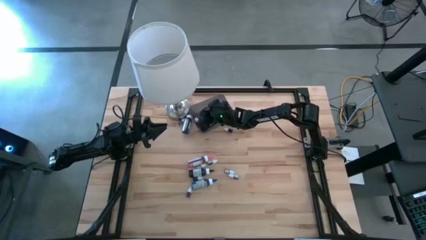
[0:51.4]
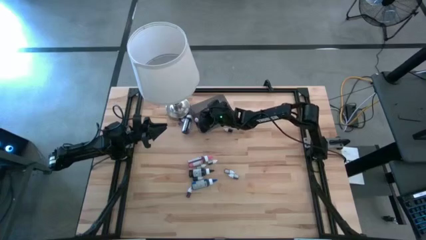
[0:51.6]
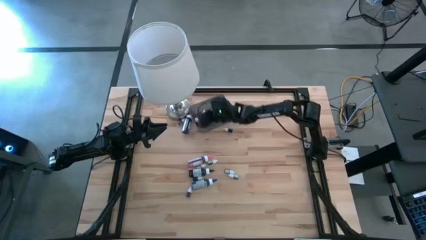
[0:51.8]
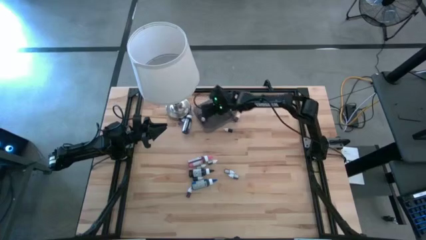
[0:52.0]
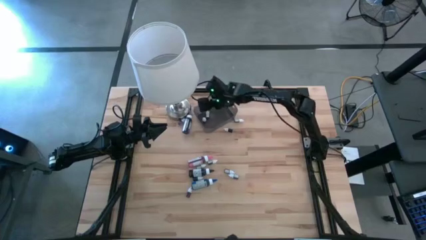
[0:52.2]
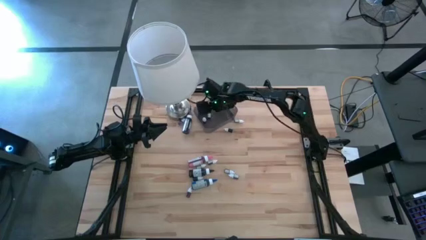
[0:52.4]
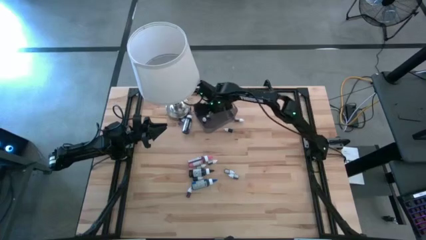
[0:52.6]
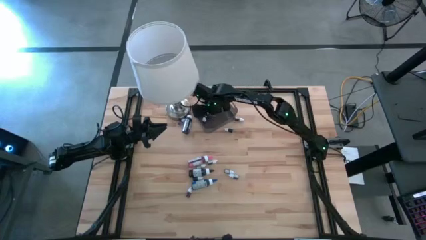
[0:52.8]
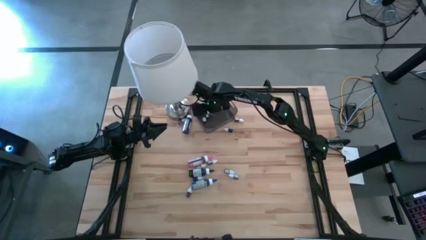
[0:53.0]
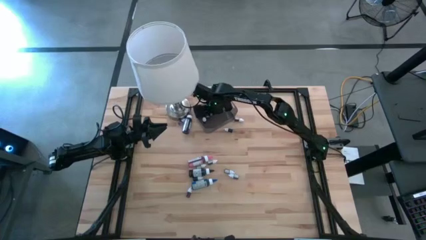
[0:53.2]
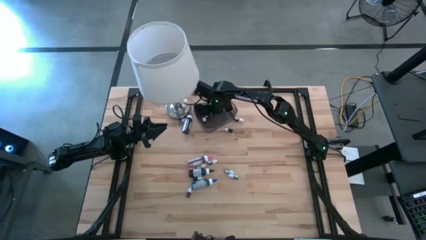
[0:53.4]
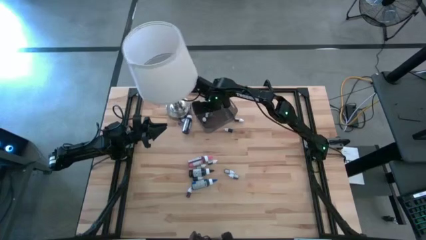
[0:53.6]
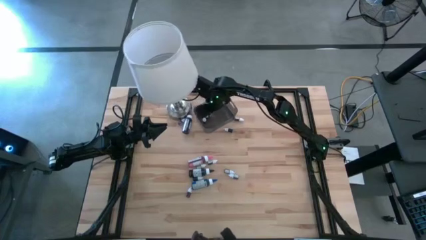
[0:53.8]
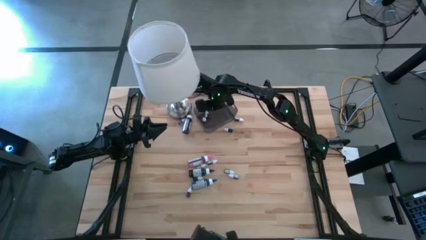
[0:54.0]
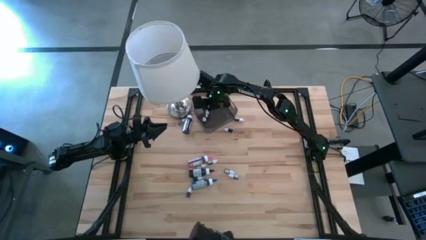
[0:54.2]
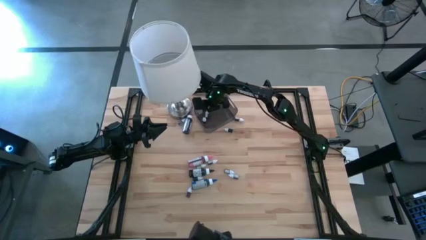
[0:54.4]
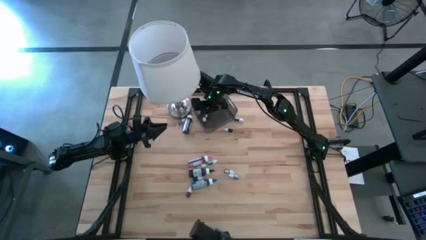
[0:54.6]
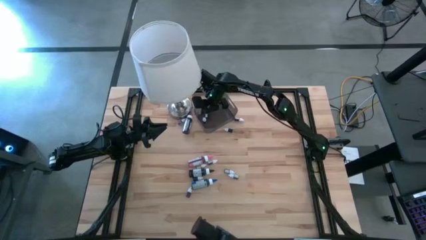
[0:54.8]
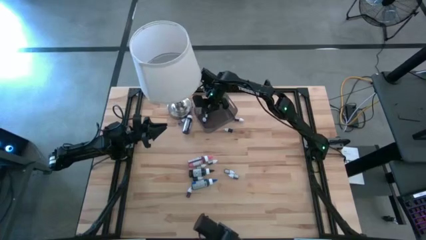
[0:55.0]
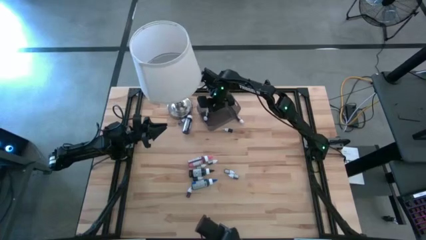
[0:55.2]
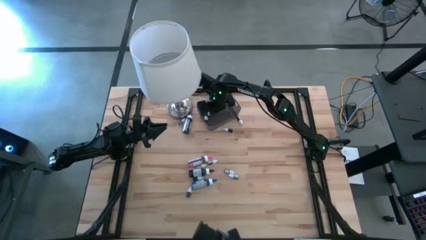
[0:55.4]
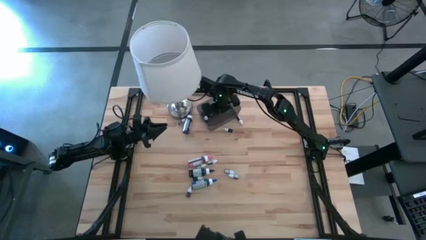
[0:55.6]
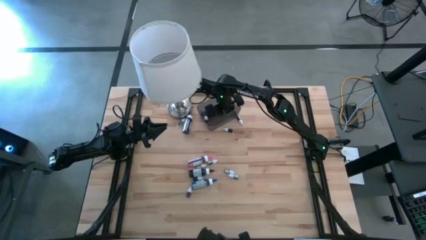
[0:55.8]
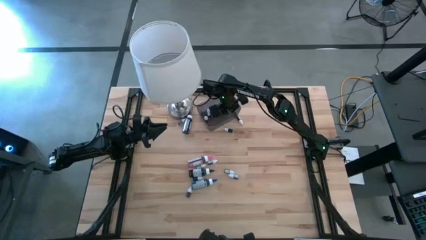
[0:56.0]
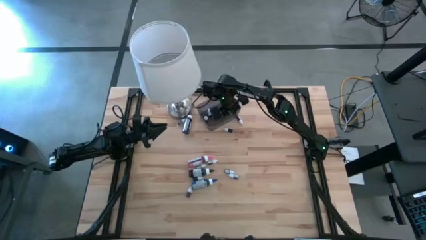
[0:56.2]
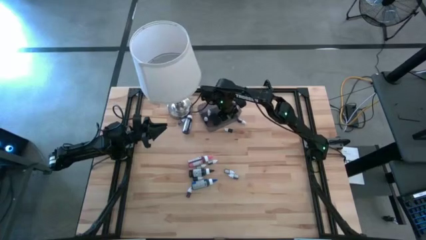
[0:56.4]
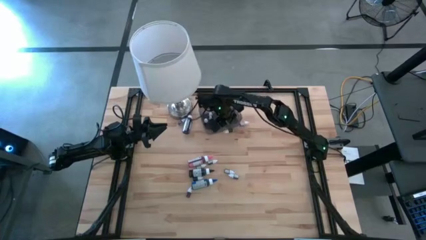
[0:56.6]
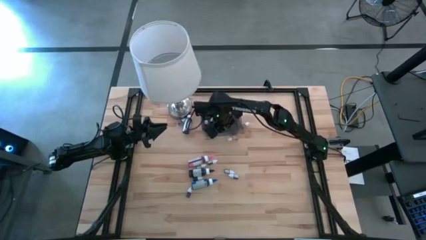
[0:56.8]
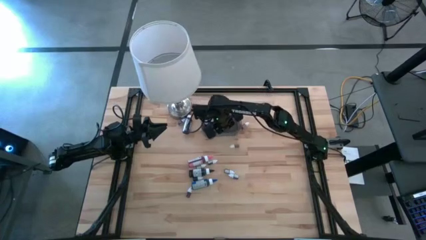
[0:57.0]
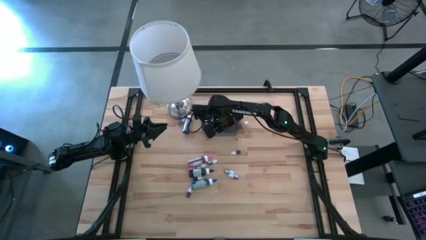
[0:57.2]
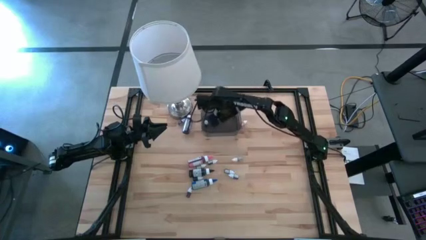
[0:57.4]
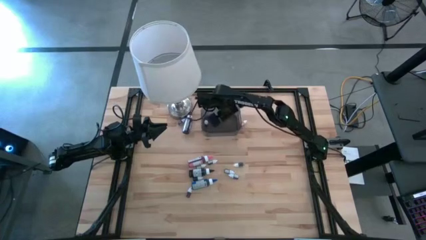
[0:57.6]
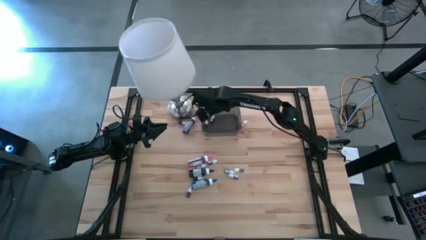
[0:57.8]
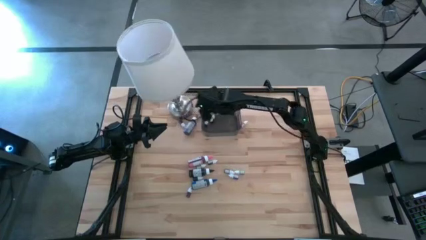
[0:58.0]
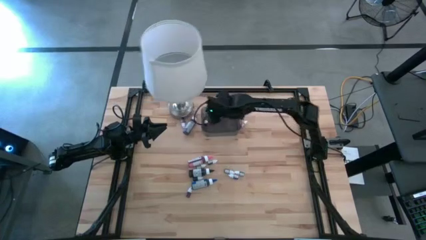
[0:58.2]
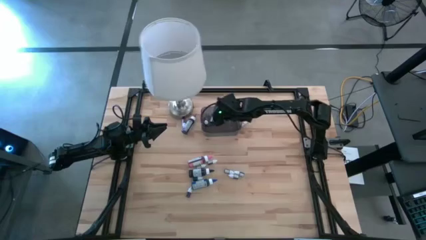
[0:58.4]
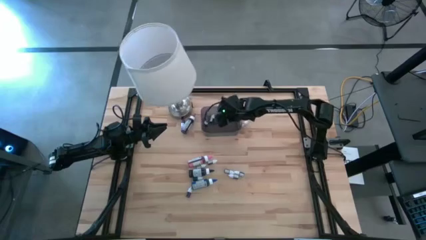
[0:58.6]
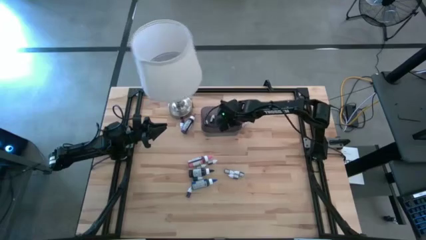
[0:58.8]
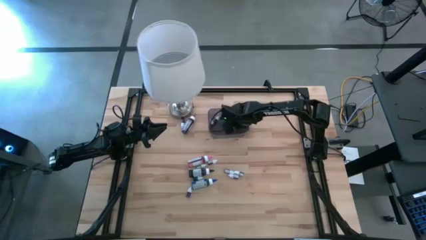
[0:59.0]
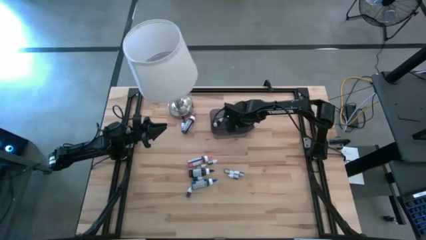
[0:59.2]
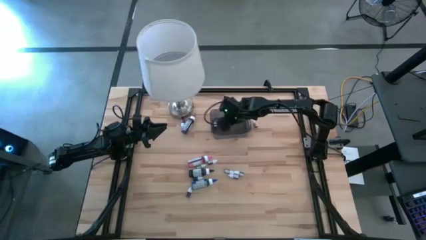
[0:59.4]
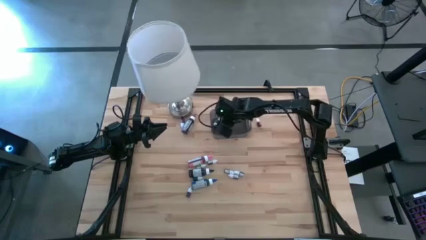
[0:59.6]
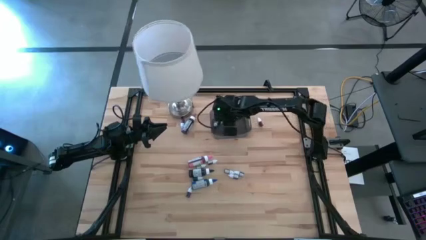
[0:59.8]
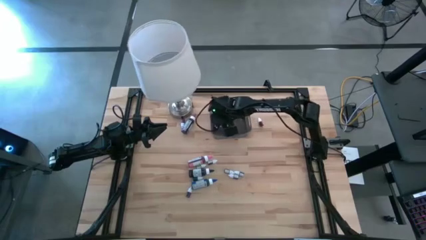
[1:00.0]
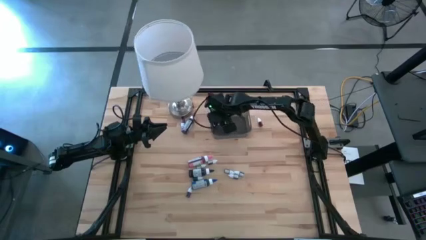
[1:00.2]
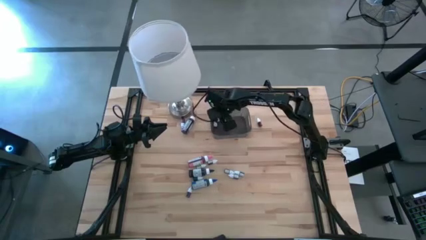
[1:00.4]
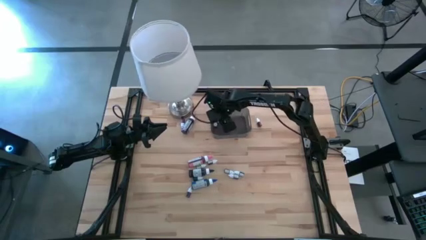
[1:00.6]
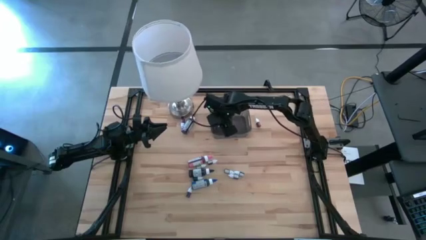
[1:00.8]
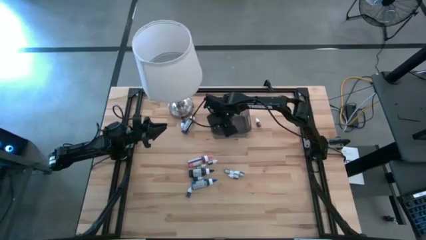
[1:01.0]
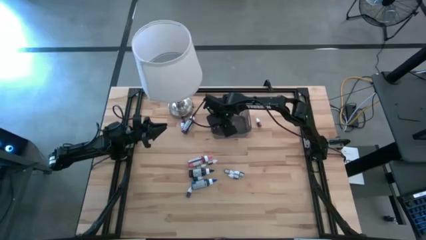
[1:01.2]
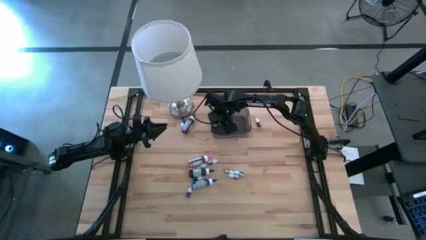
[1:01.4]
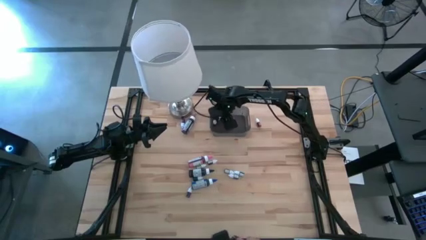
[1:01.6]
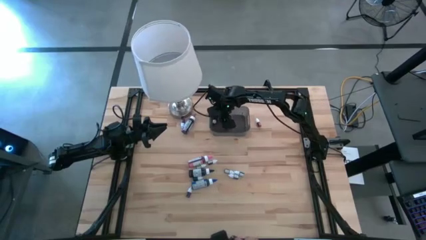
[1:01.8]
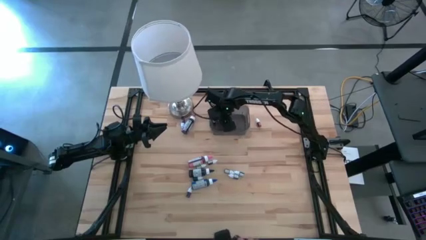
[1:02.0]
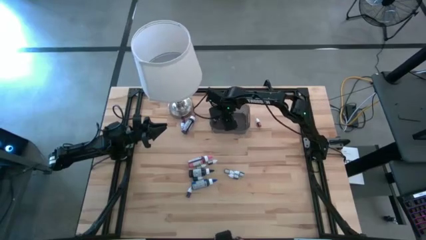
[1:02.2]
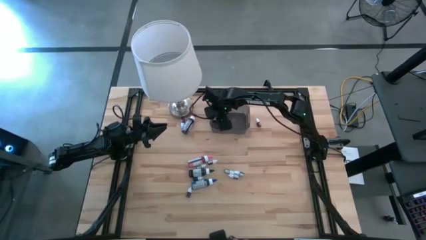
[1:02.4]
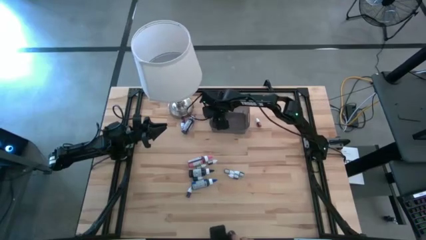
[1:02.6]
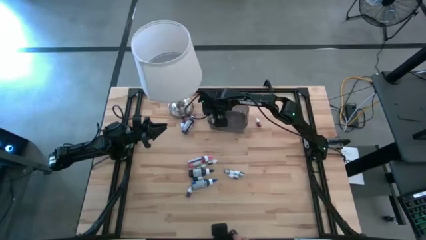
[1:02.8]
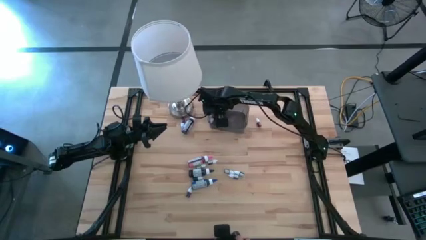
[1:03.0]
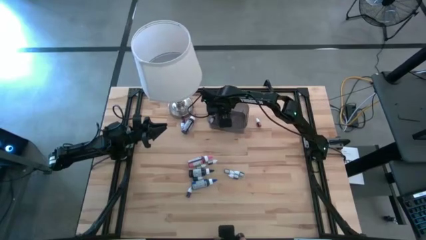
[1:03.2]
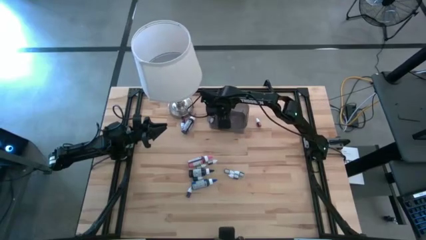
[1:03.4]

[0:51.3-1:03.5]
Task: Pick & Place food coloring
Adjust the bin on the table

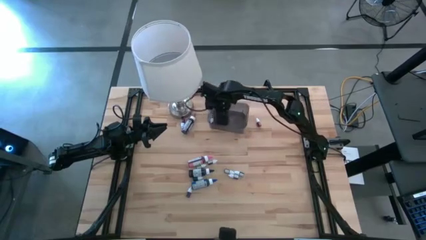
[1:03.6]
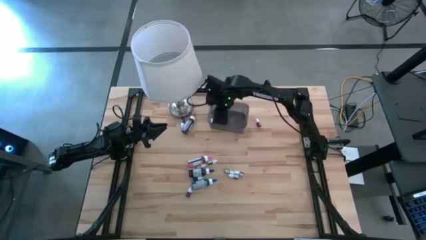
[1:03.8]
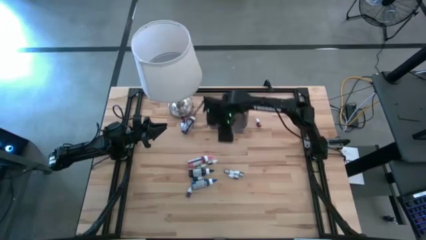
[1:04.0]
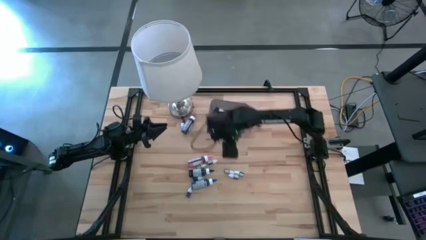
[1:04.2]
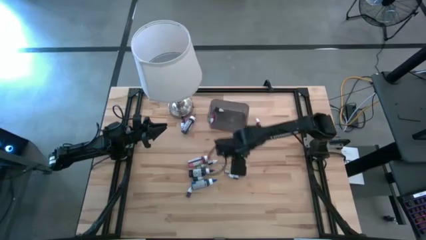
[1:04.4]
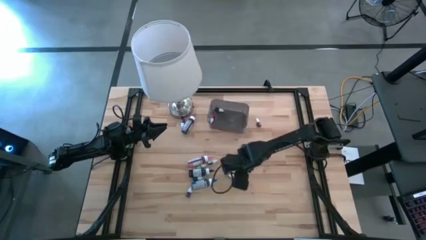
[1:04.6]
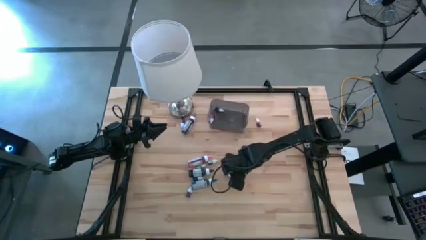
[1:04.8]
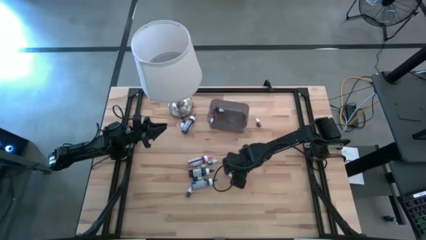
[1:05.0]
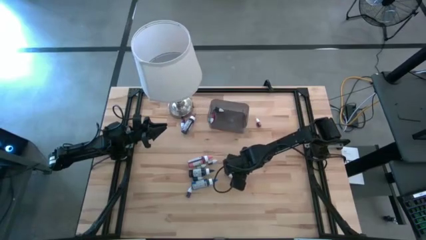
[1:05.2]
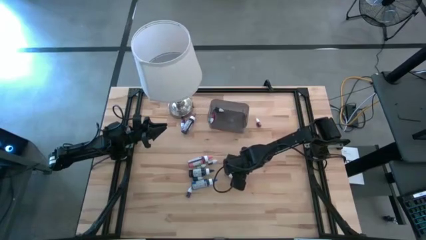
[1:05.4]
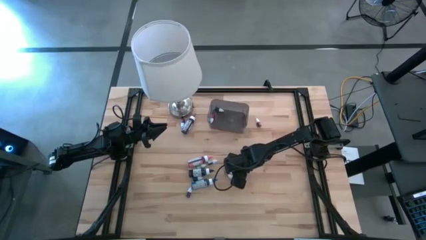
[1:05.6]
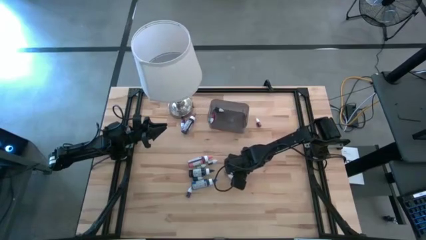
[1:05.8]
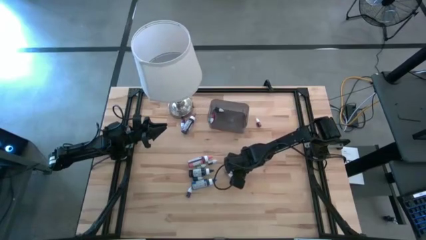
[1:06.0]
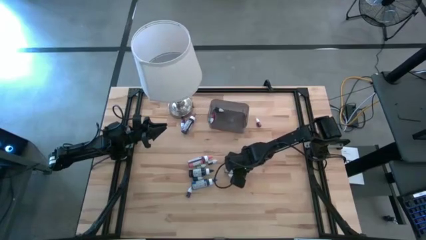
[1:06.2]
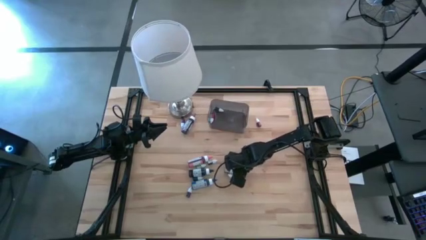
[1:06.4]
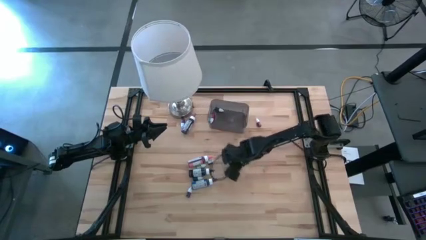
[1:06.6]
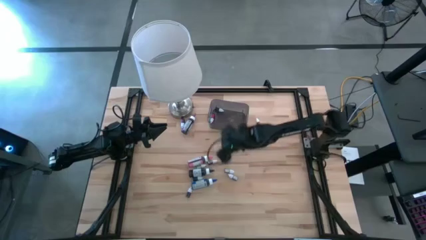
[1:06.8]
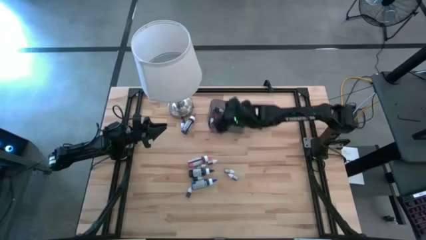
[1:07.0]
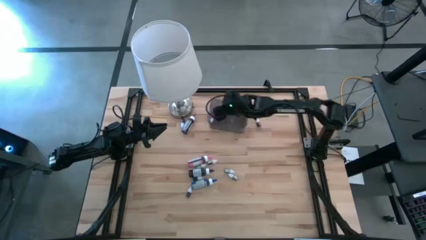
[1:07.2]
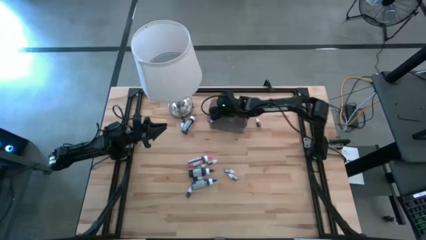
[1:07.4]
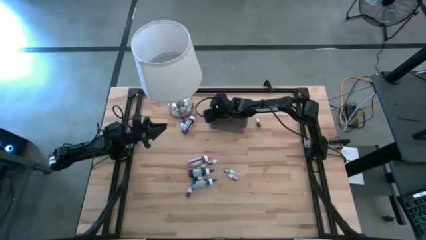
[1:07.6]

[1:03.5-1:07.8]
Put the right small green food coloring bottle into the bin
